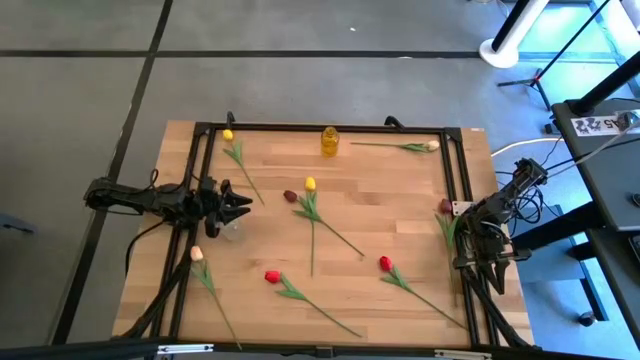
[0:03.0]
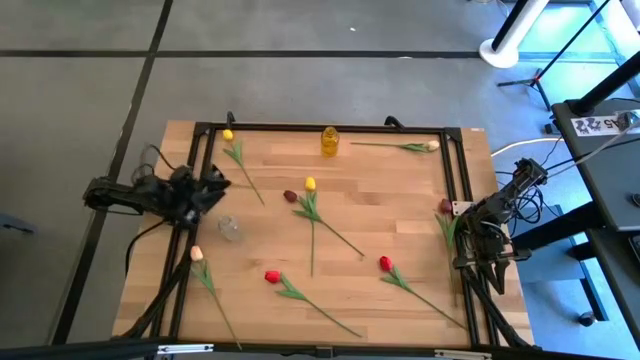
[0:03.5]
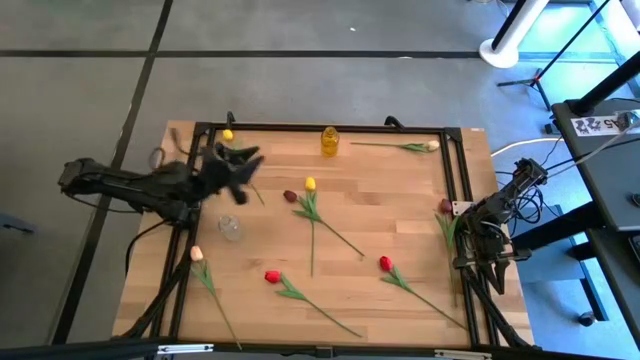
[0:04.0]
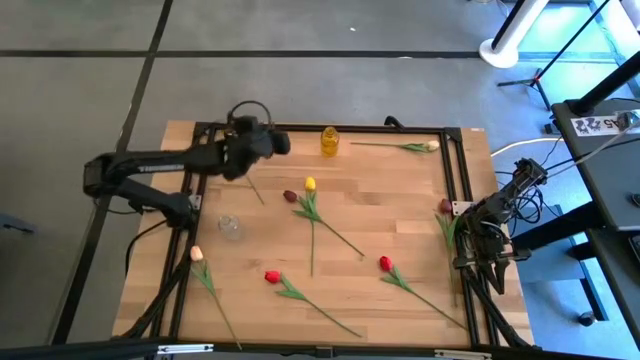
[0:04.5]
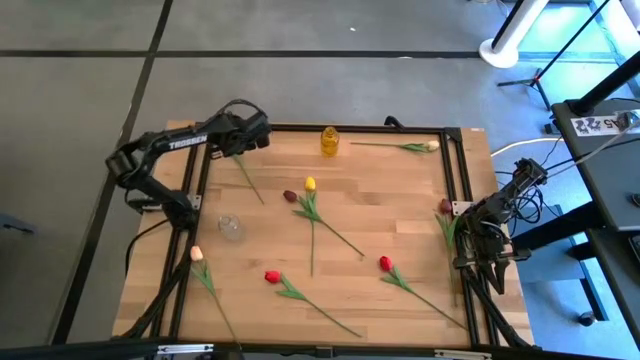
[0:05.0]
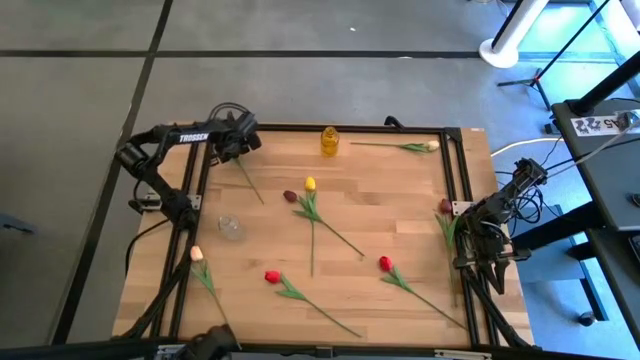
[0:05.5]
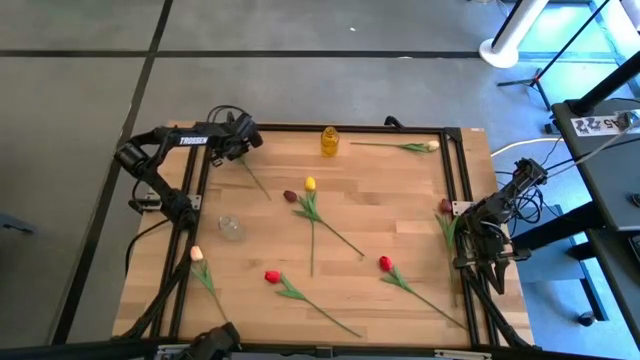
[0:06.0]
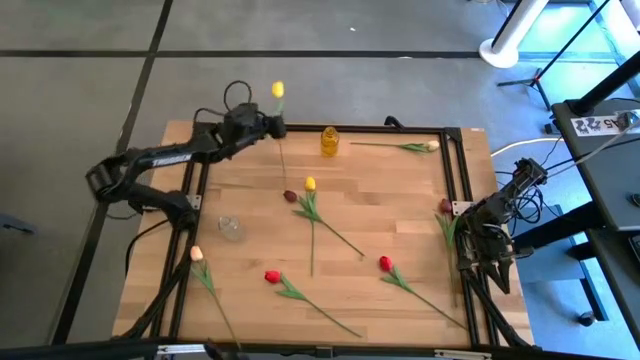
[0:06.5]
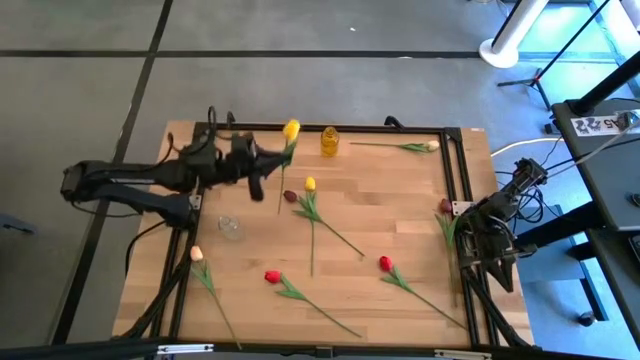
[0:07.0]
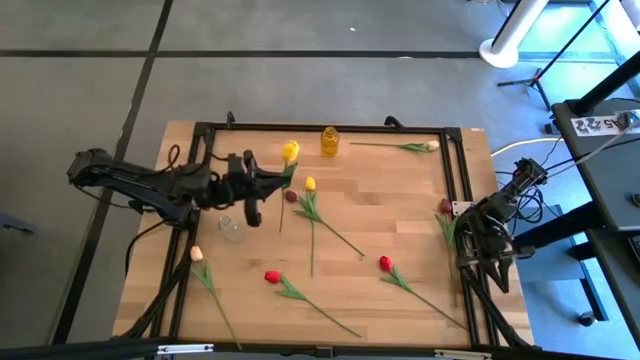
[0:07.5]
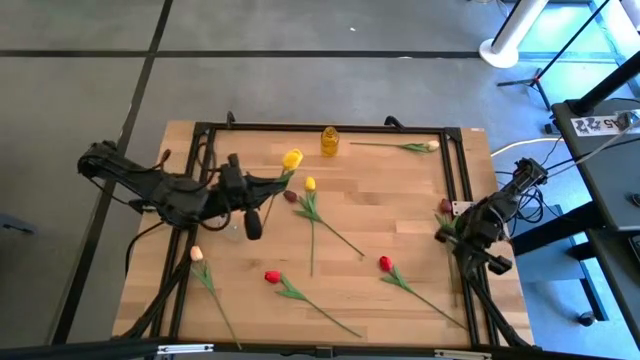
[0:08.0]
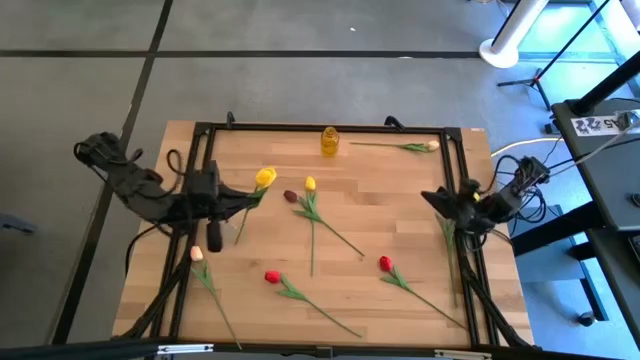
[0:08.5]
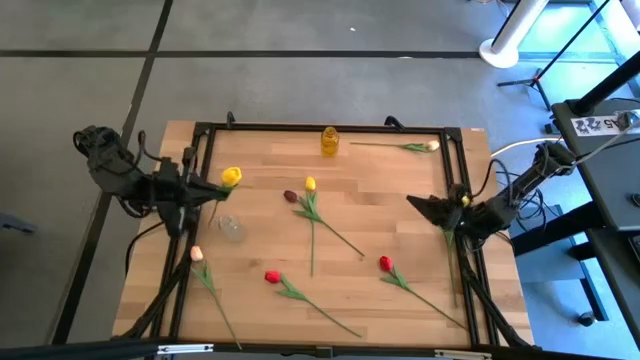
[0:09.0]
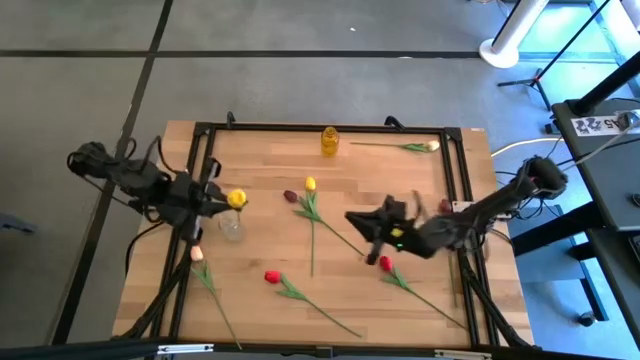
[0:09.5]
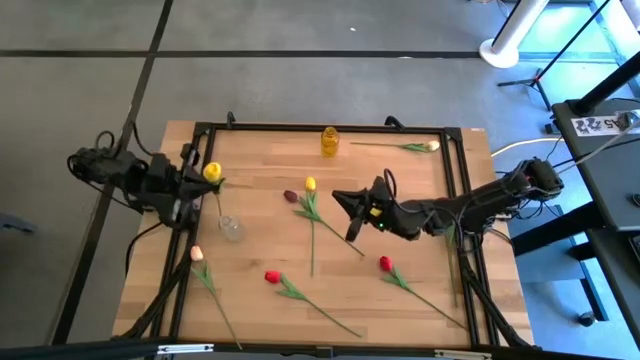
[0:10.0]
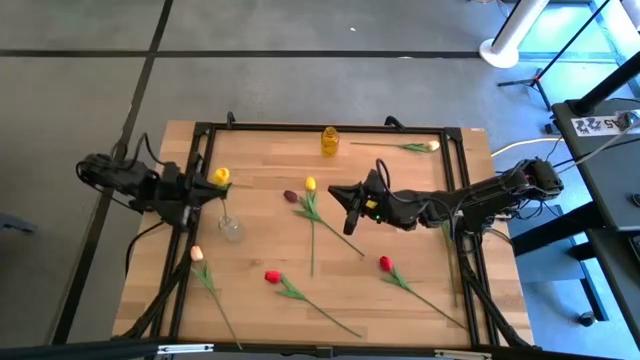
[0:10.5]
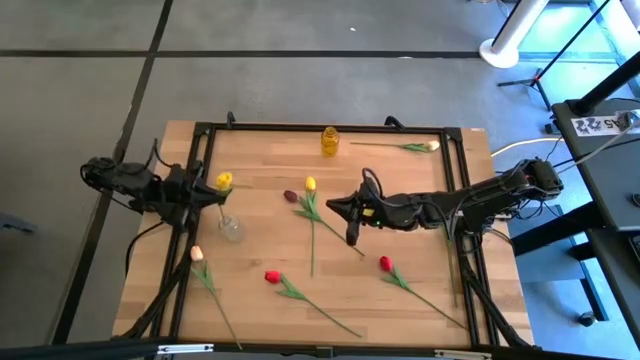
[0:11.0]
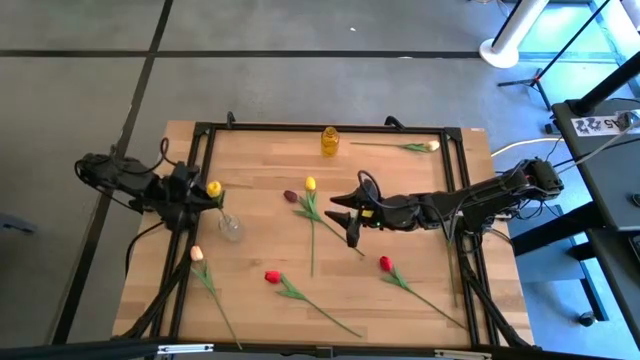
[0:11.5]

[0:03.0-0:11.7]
Task: Sort flowers into vase by color
Put top yellow flower into the transparent vase

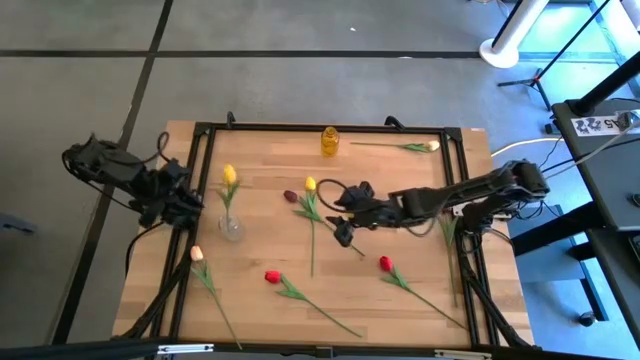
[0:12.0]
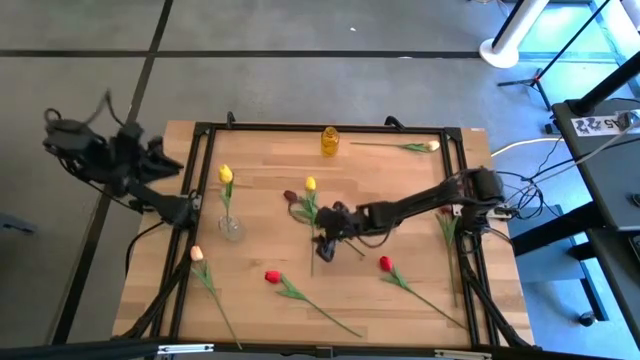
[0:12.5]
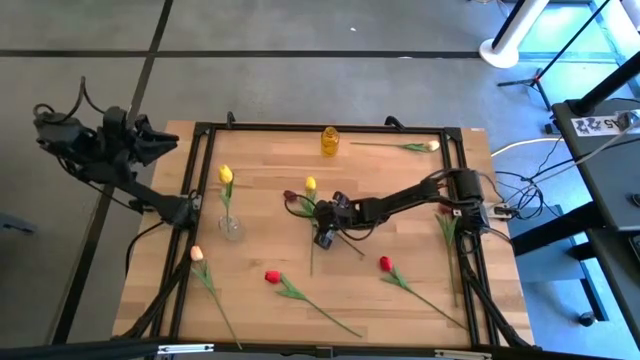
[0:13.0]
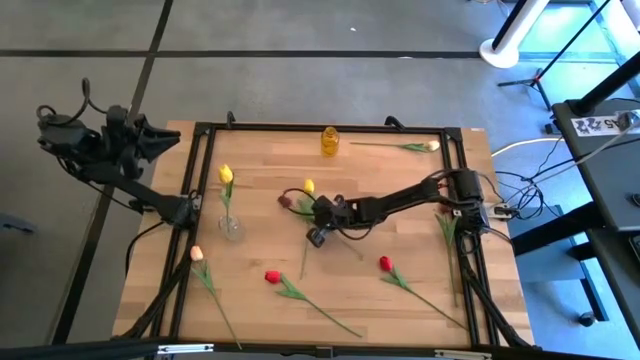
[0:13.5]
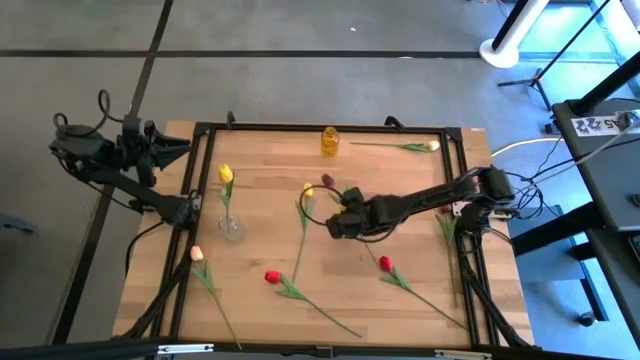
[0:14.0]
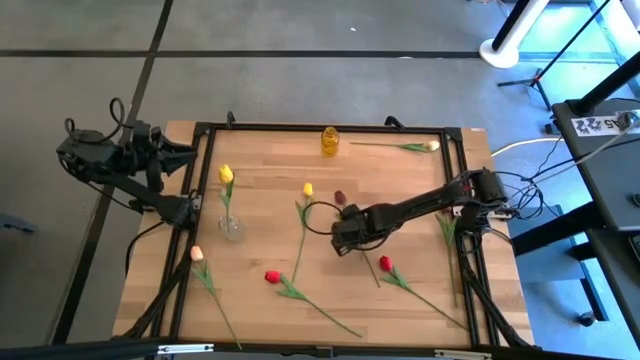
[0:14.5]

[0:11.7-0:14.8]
Adjust the red flower

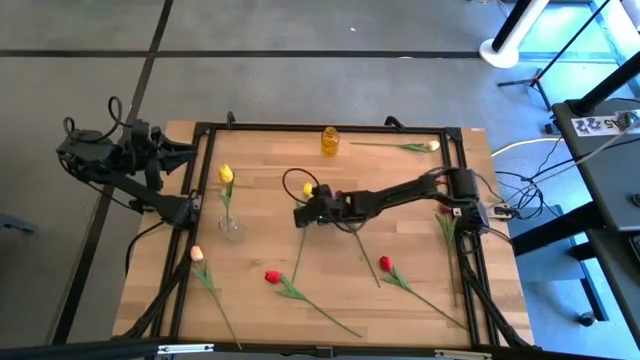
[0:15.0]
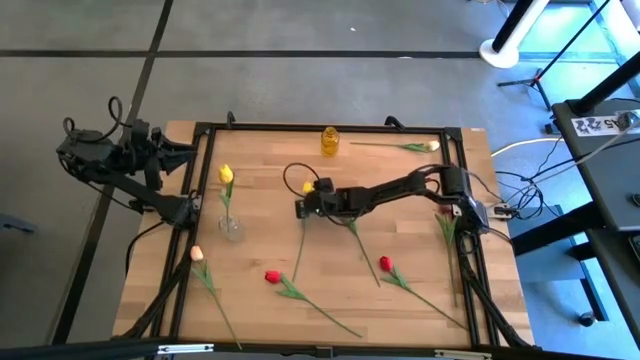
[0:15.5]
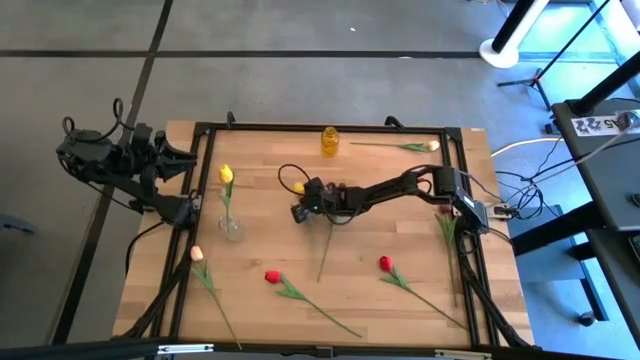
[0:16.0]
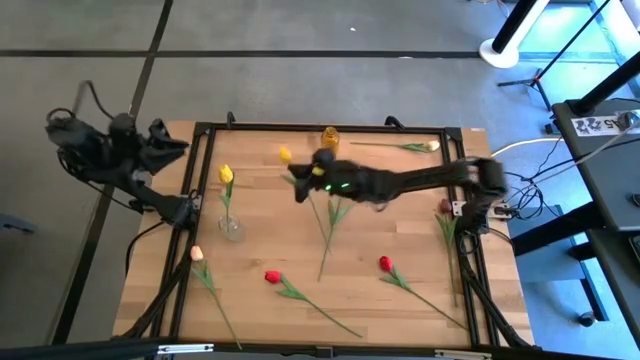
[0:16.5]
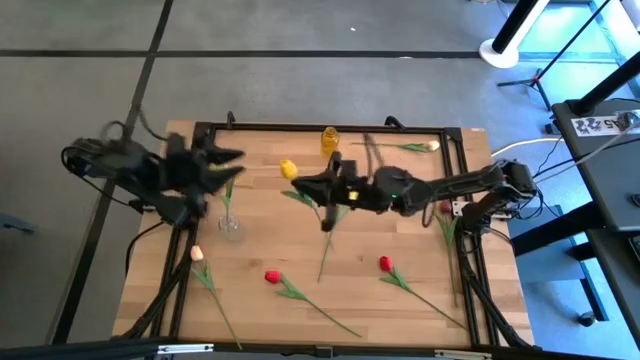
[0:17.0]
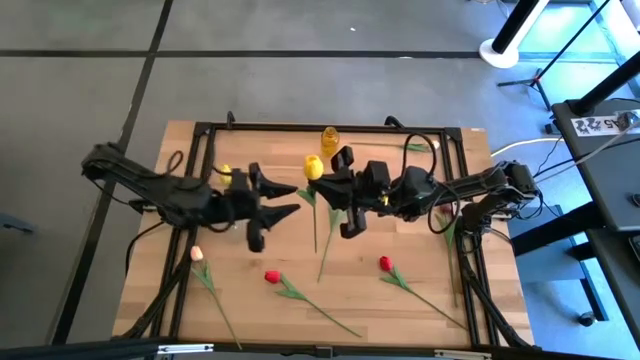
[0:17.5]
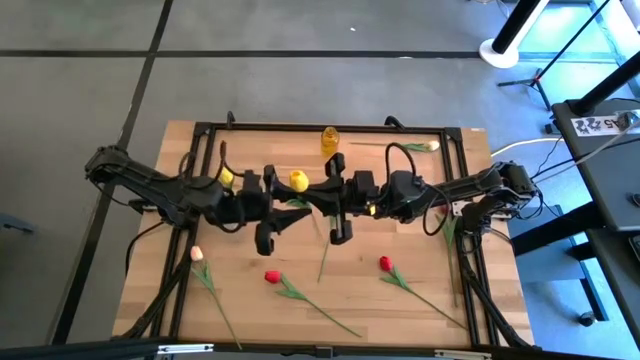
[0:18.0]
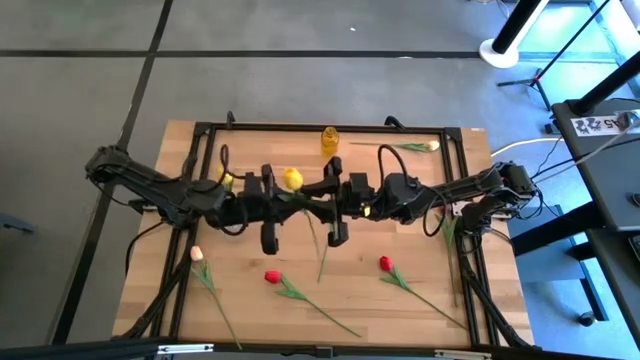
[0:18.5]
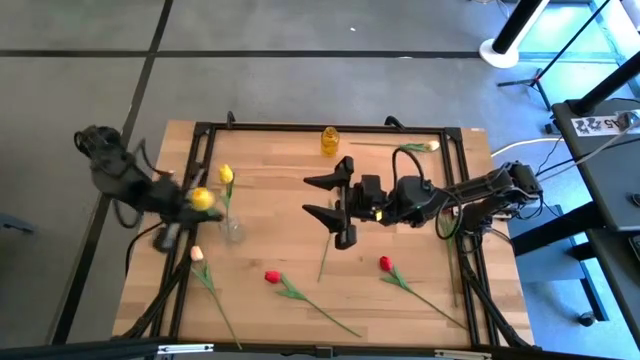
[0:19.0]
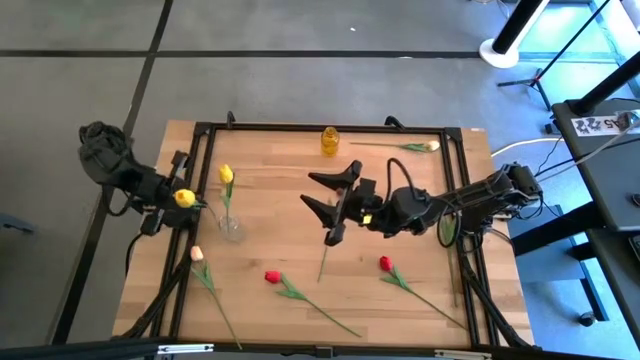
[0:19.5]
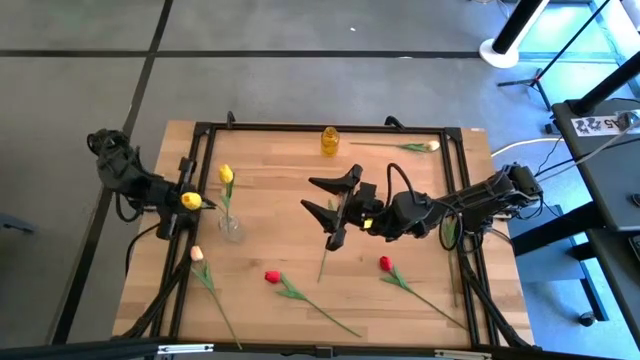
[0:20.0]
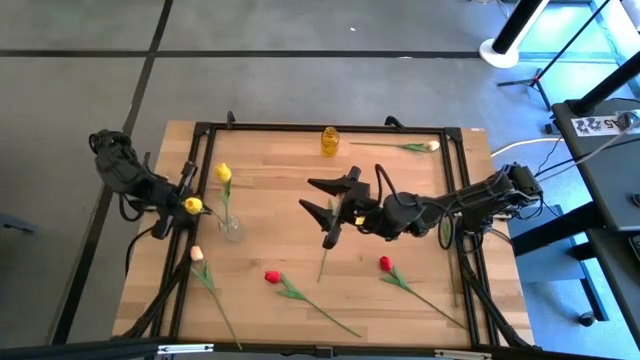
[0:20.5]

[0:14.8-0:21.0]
Put the yellow flower into the transparent vase

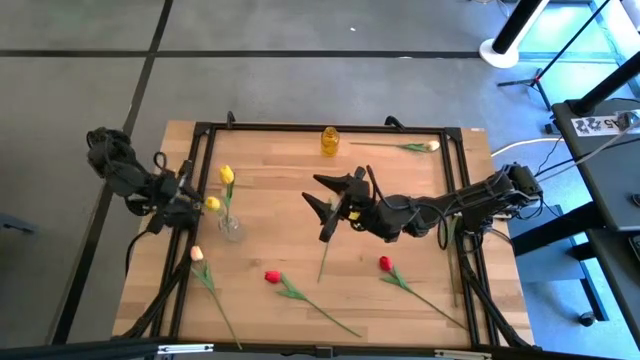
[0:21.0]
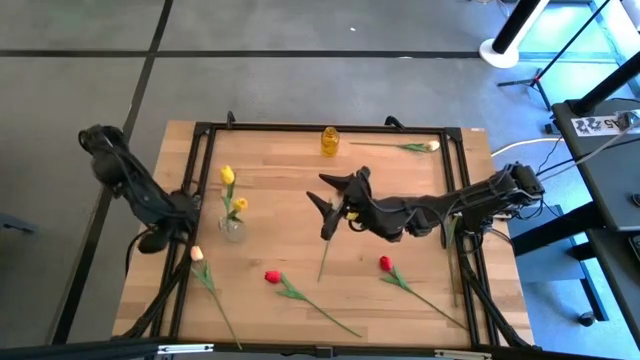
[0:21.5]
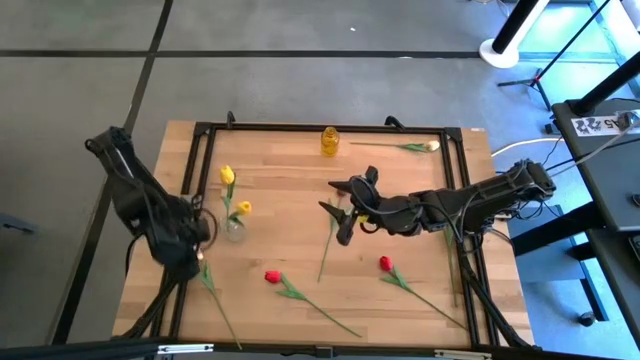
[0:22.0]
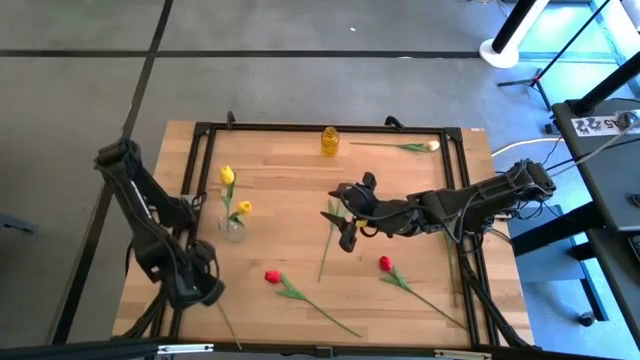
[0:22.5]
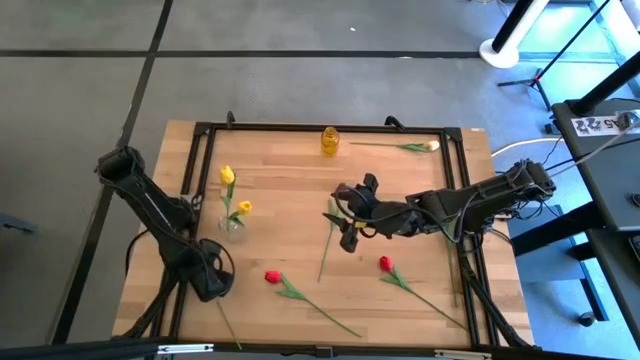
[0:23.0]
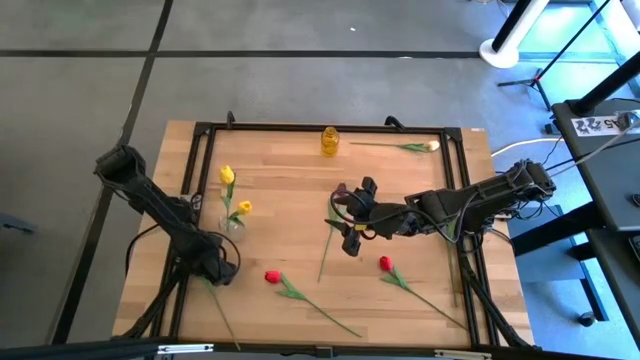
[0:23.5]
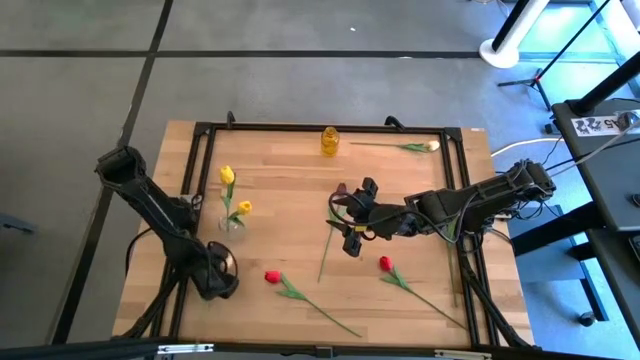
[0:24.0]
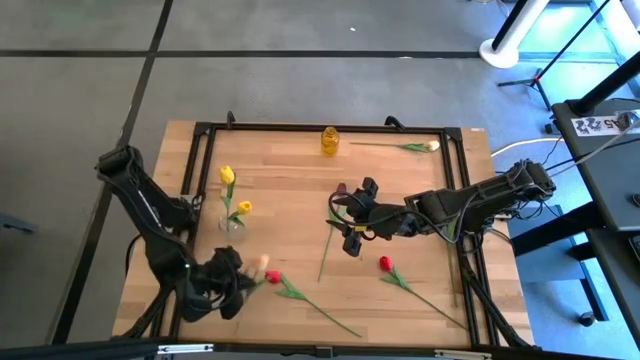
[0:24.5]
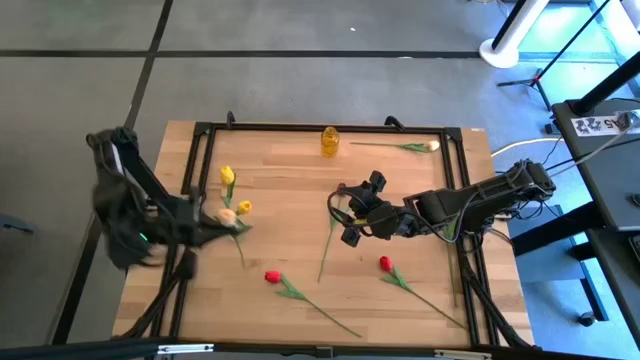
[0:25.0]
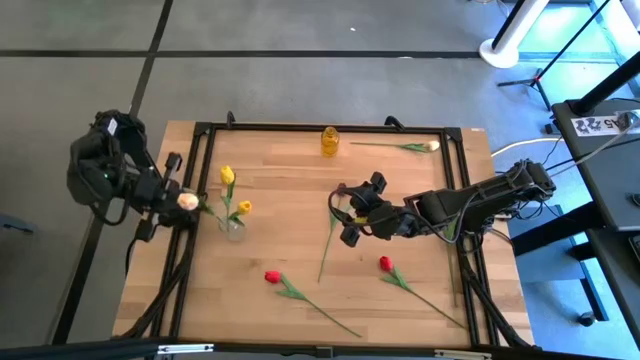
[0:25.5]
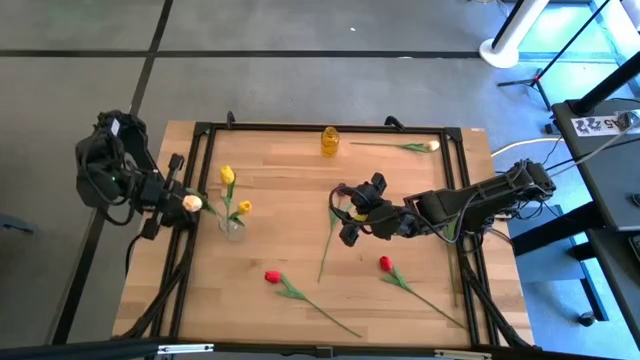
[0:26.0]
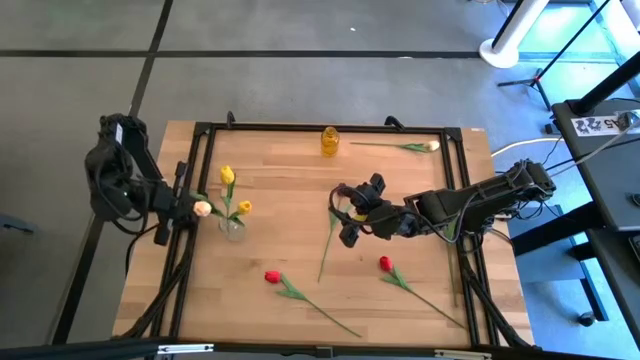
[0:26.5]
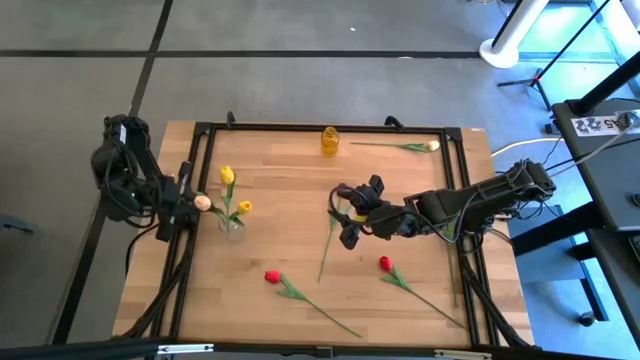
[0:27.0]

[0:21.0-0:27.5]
Put the bottom white flower into the transparent vase
